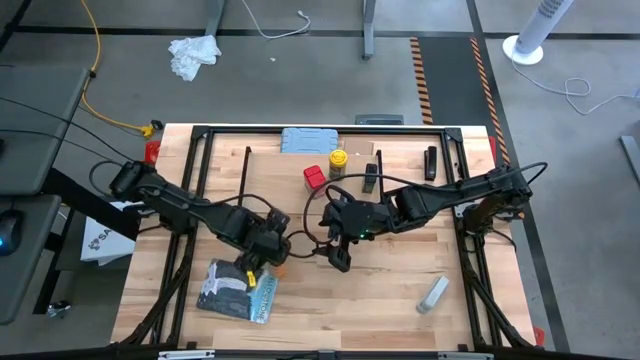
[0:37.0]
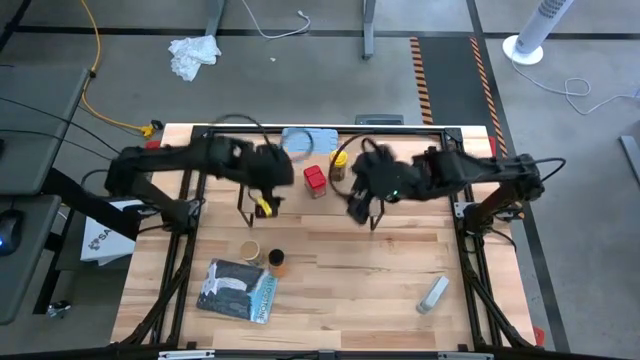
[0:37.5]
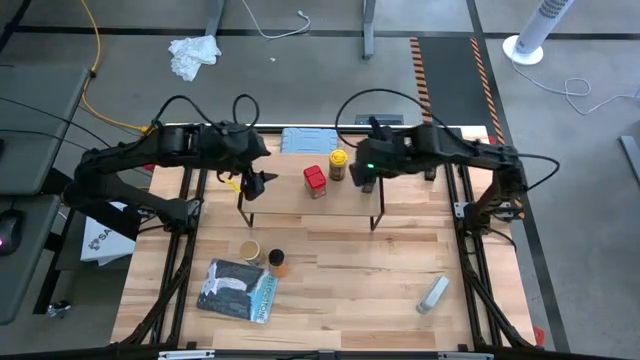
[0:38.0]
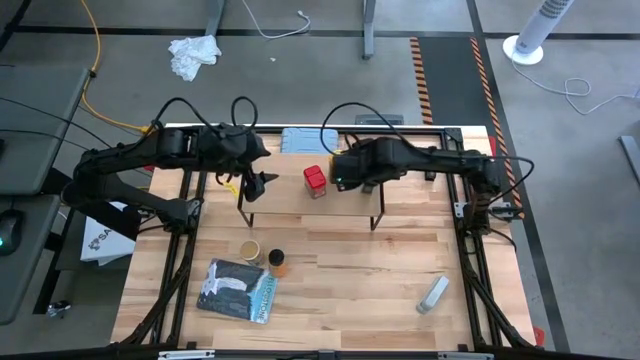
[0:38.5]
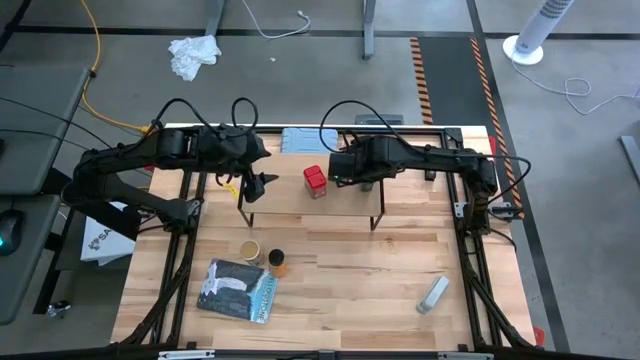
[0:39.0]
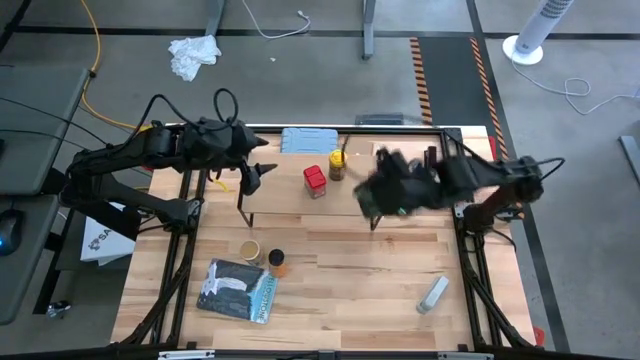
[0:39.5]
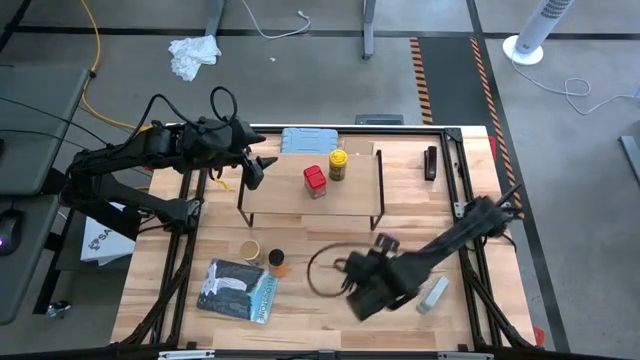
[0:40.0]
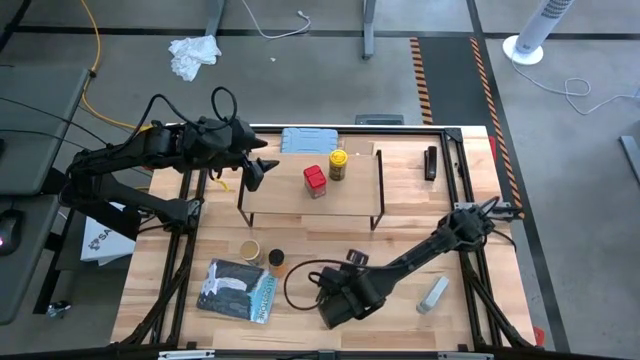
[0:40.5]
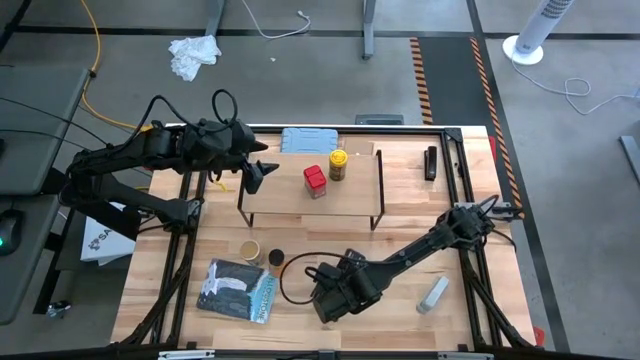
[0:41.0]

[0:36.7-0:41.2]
Task: Shelf spices
Remove the black seasoning can from the shelf

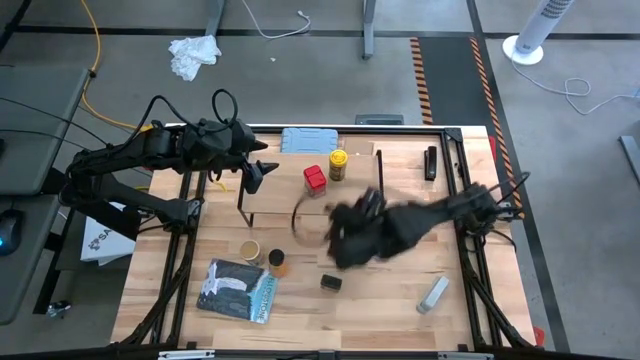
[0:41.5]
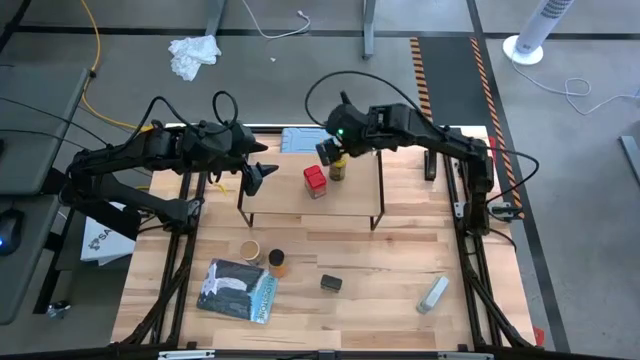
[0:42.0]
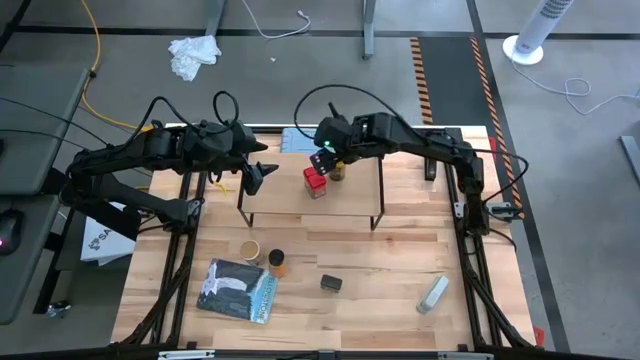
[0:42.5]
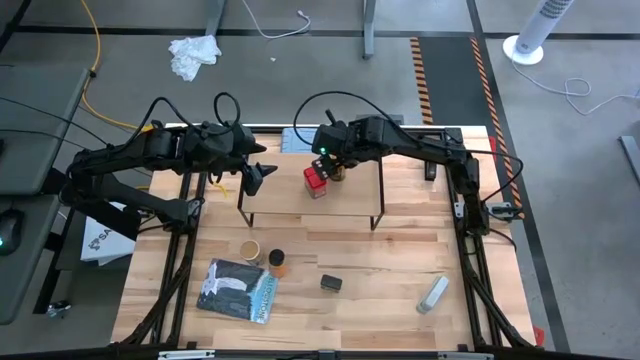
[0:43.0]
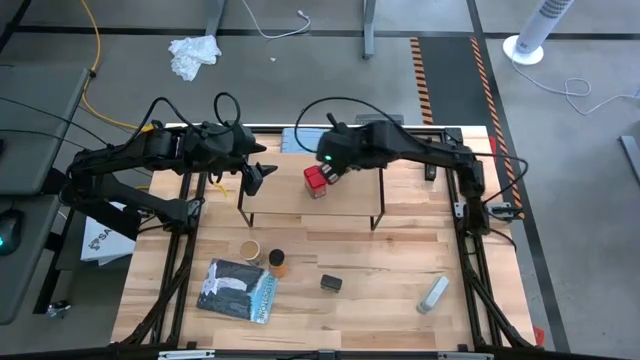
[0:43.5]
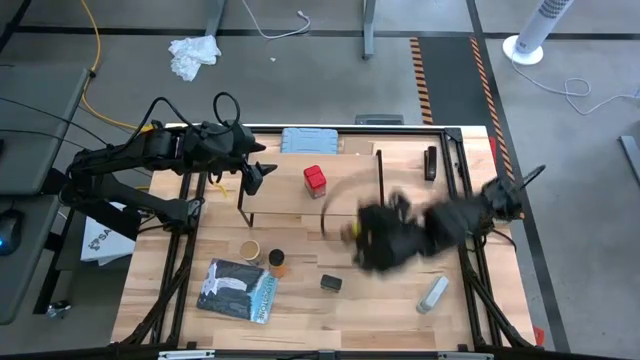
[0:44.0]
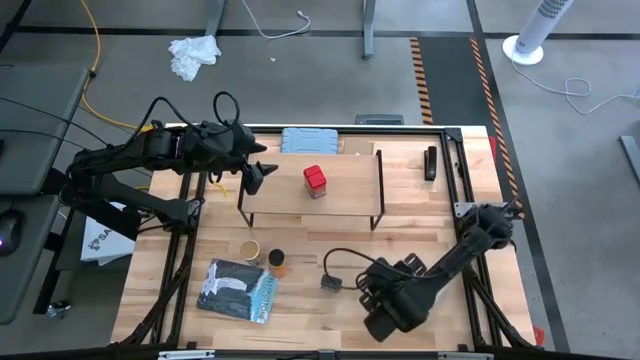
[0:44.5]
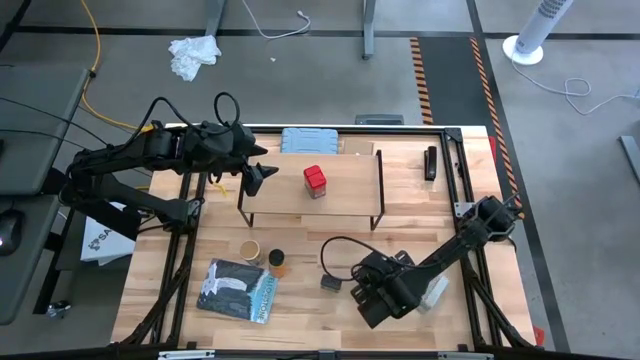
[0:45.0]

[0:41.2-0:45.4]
Remove the yellow seasoning bottle from the shelf

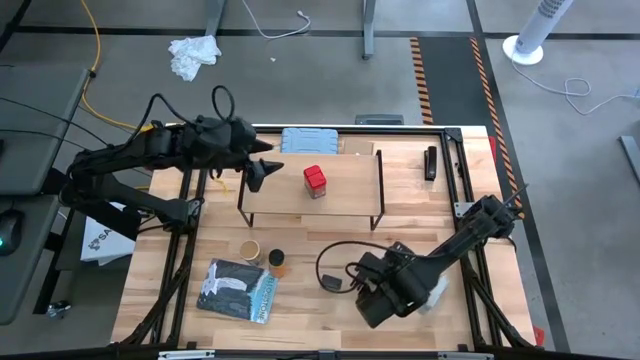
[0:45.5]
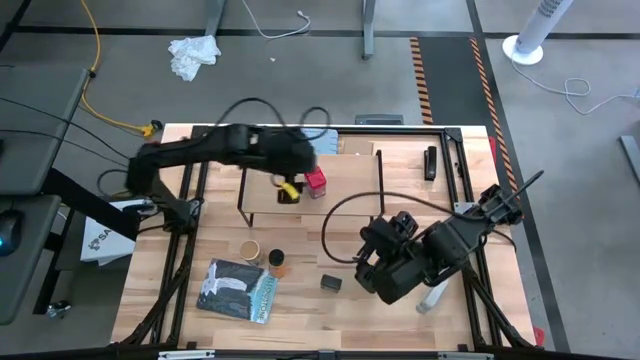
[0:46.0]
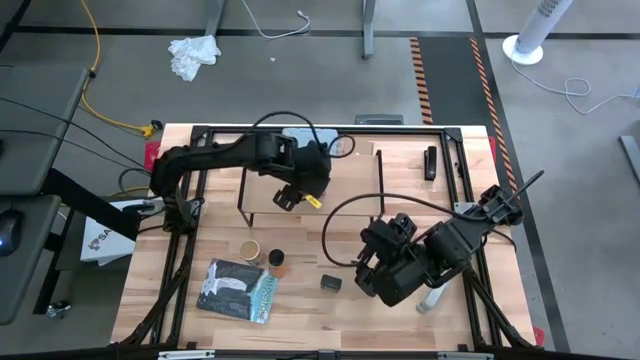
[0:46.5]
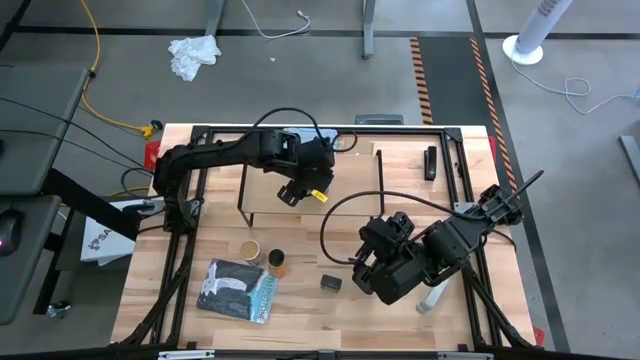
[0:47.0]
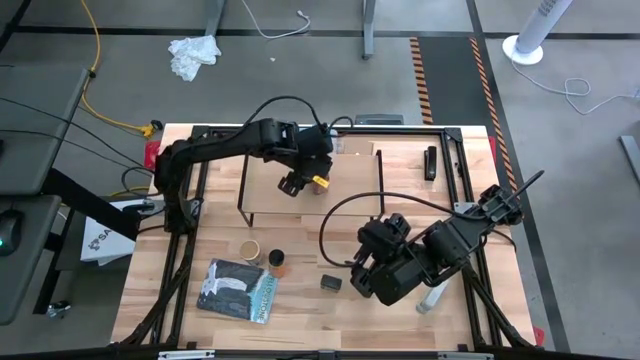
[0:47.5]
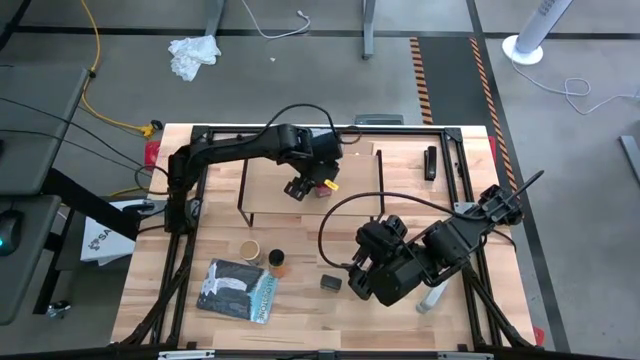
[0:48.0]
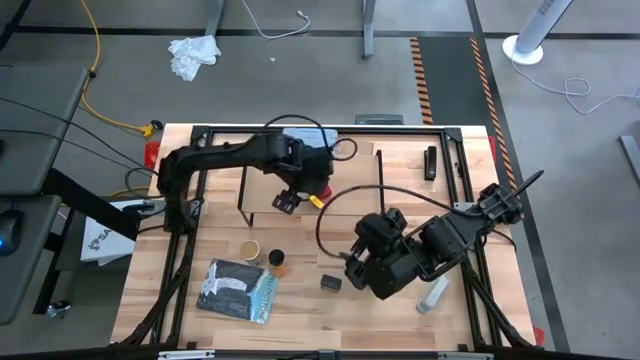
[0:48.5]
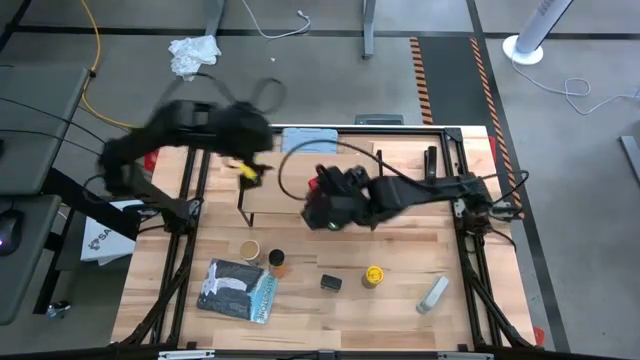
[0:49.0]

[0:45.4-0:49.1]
Remove the red seasoning bottle from the shelf

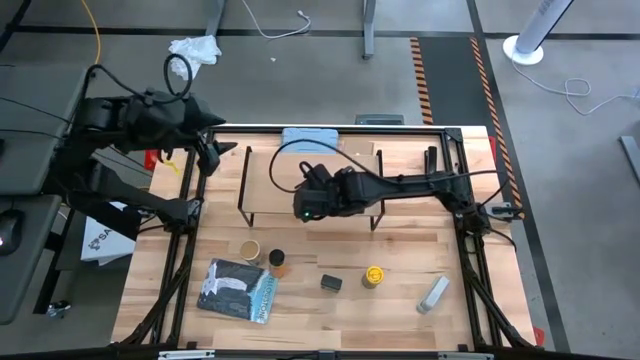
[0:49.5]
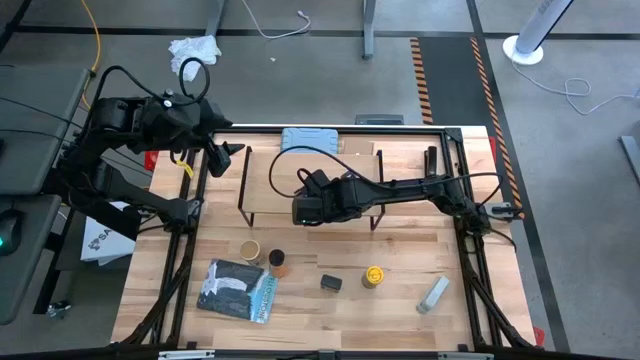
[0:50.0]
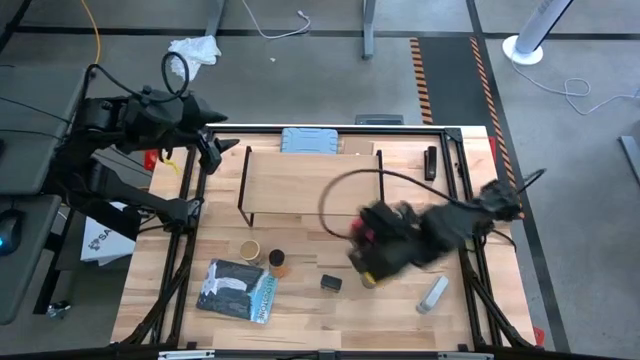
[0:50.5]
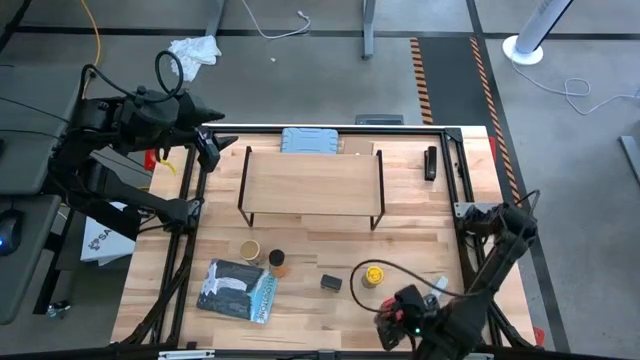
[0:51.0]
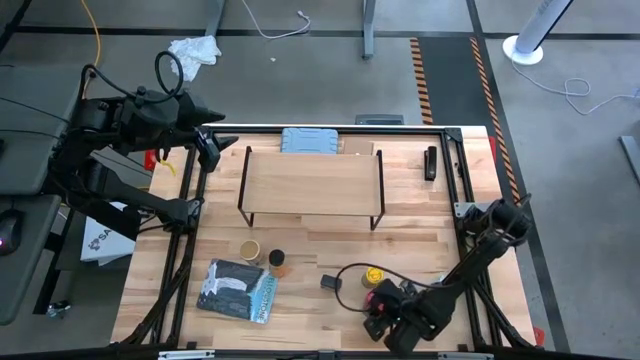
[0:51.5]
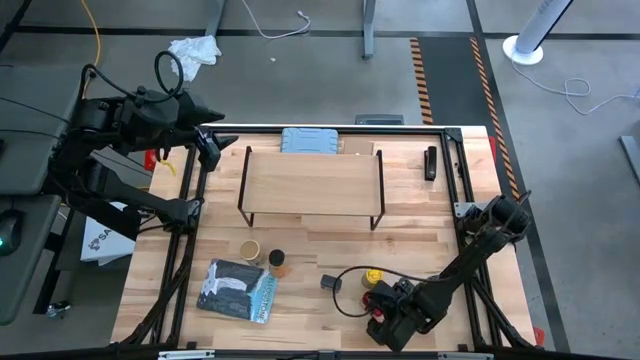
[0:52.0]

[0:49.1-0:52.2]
Remove the red seasoning bottle from the shelf

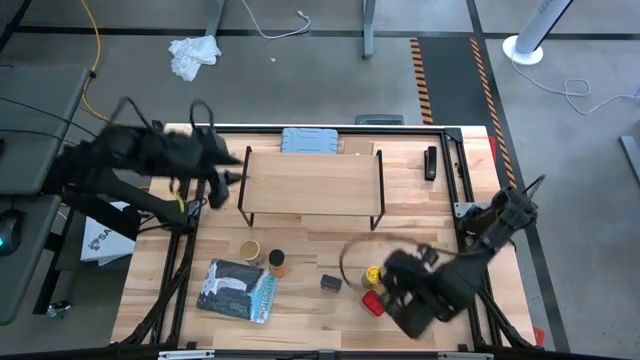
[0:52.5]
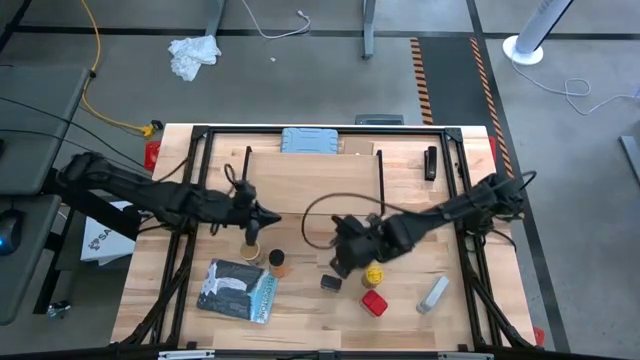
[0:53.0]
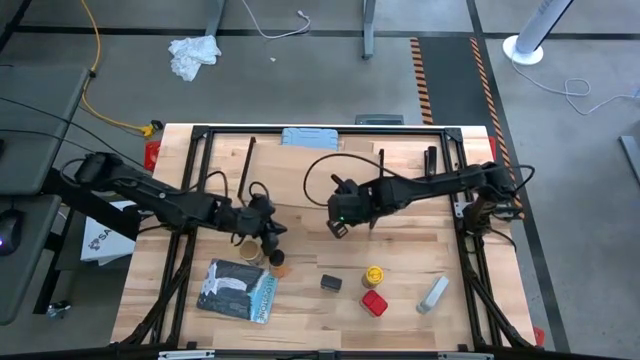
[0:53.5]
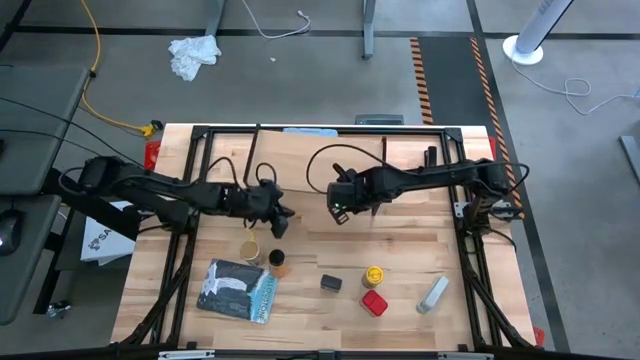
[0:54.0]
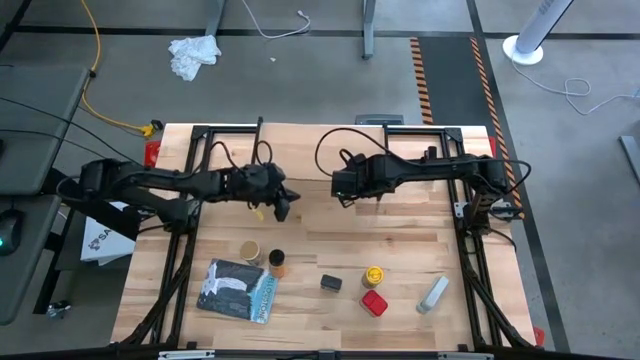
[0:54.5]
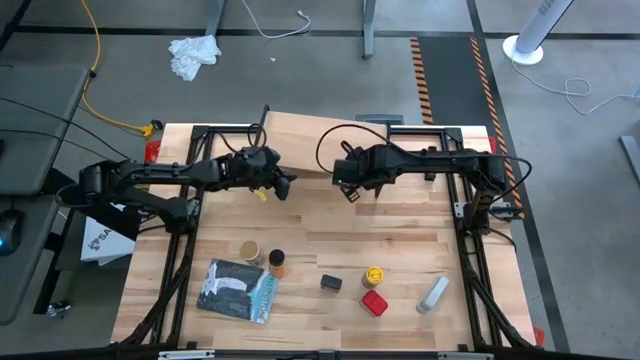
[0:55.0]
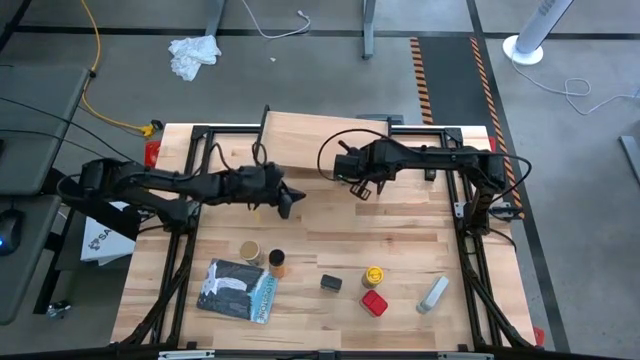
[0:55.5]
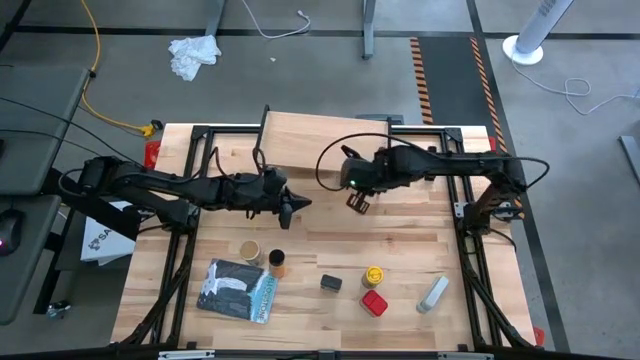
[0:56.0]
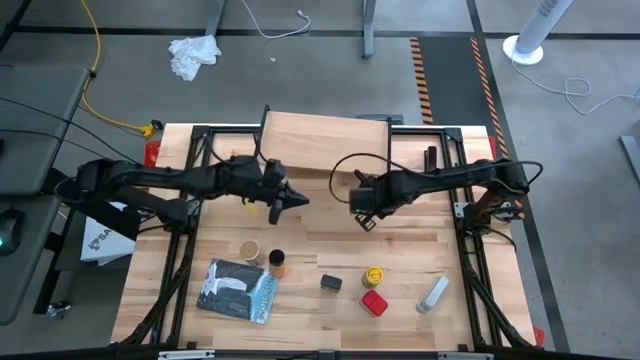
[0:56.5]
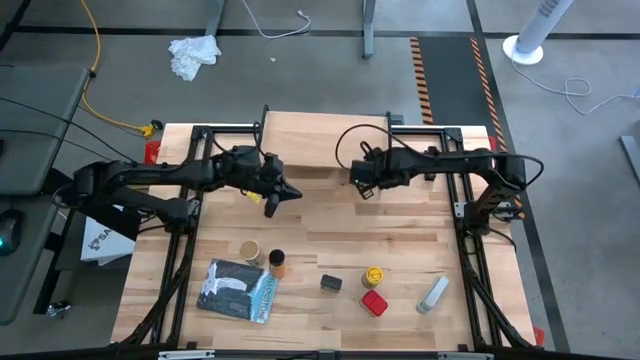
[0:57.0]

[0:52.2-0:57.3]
Move the shelf to the top-center of the table
